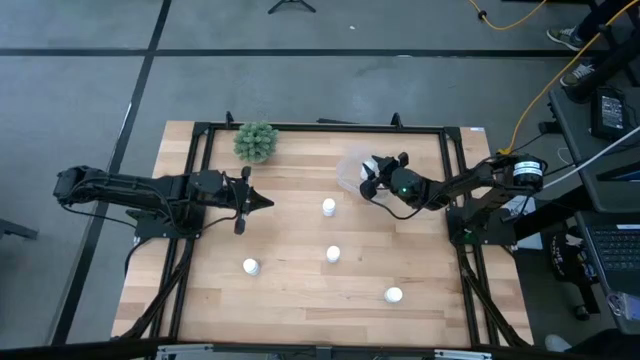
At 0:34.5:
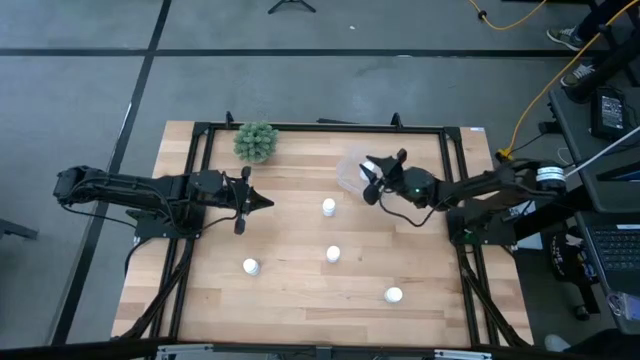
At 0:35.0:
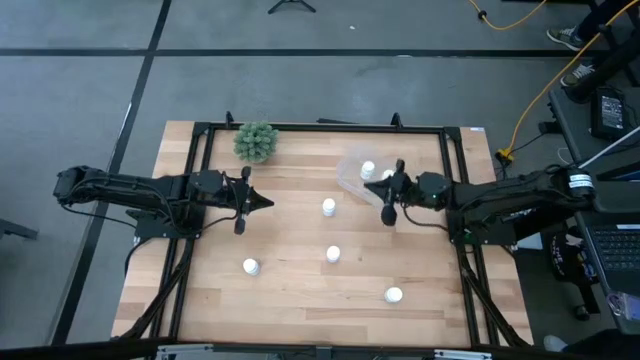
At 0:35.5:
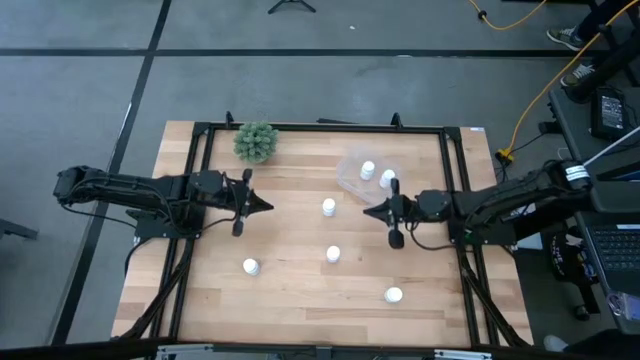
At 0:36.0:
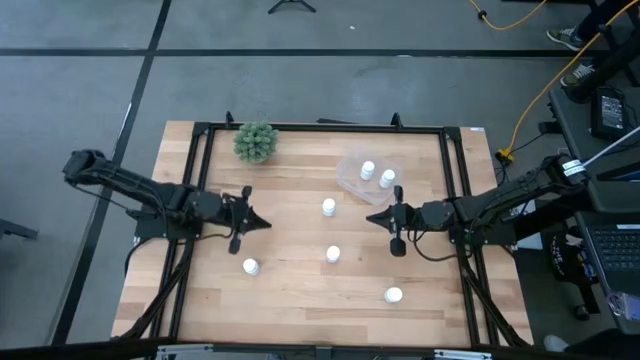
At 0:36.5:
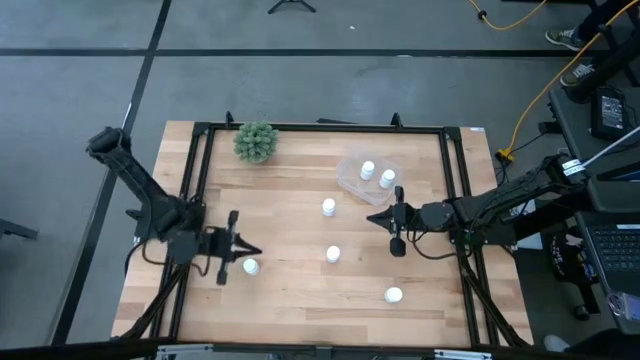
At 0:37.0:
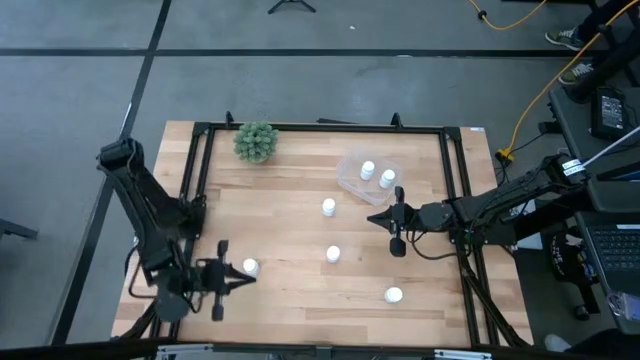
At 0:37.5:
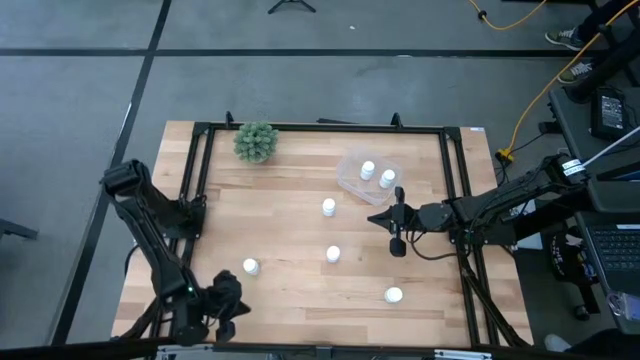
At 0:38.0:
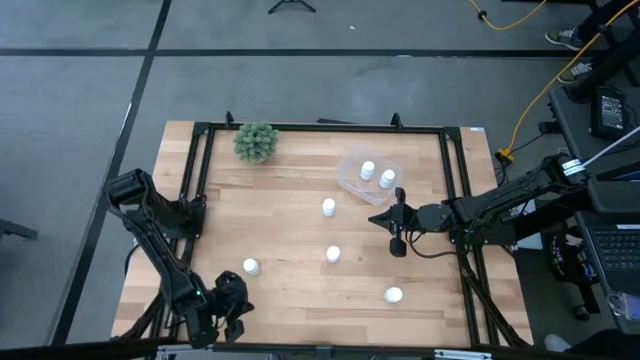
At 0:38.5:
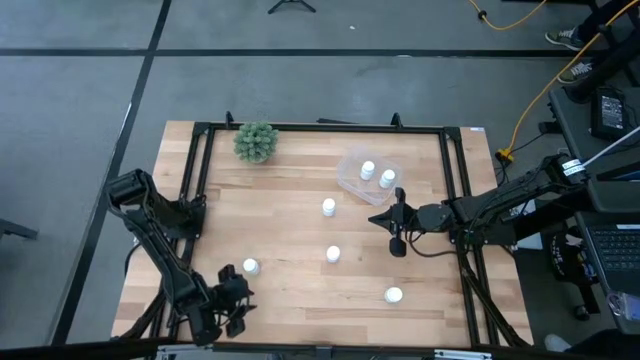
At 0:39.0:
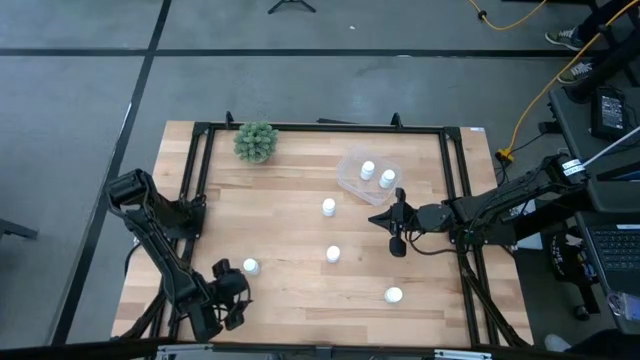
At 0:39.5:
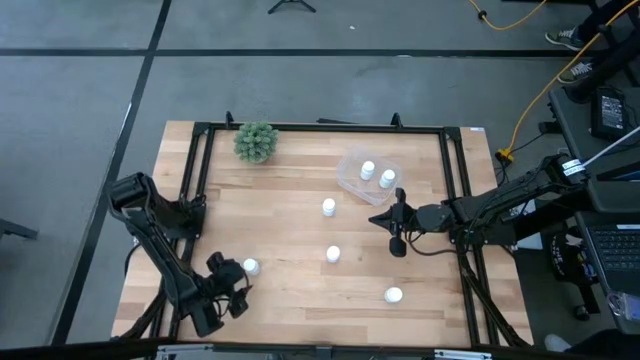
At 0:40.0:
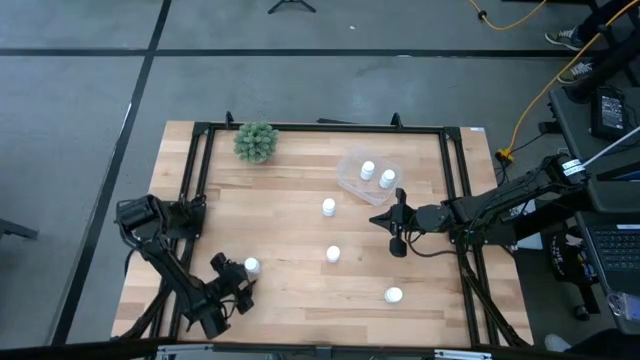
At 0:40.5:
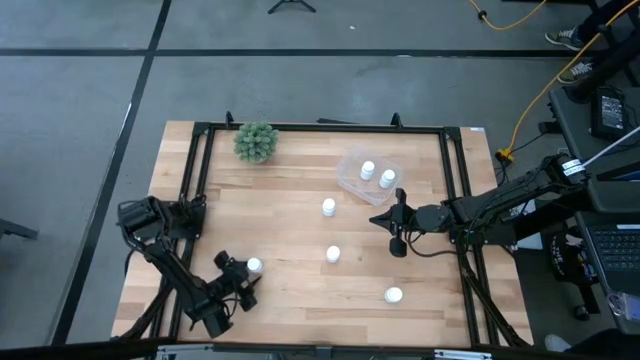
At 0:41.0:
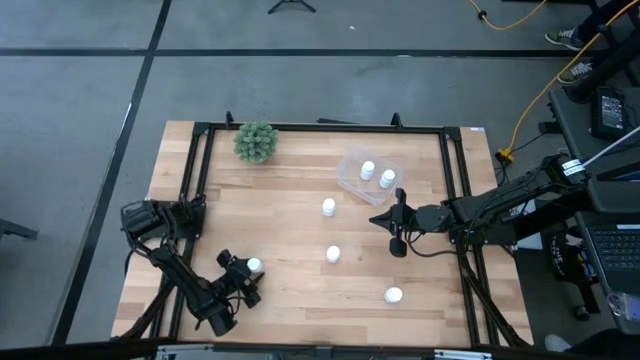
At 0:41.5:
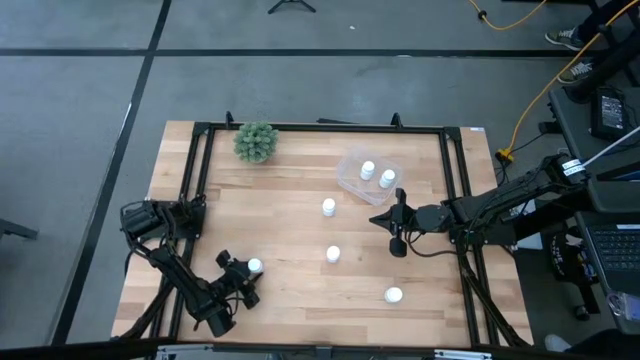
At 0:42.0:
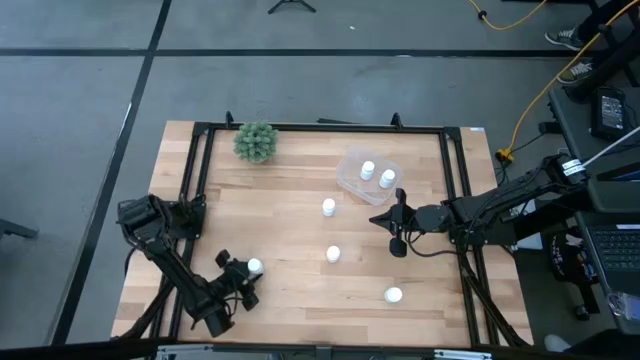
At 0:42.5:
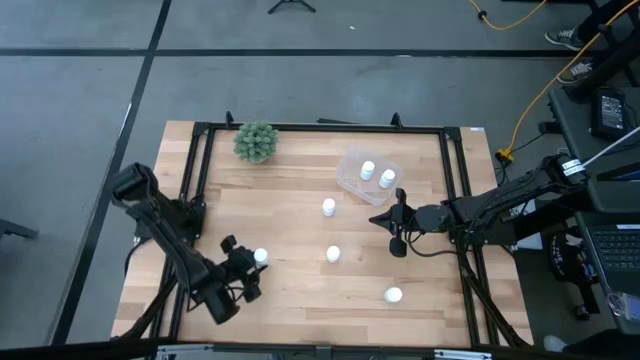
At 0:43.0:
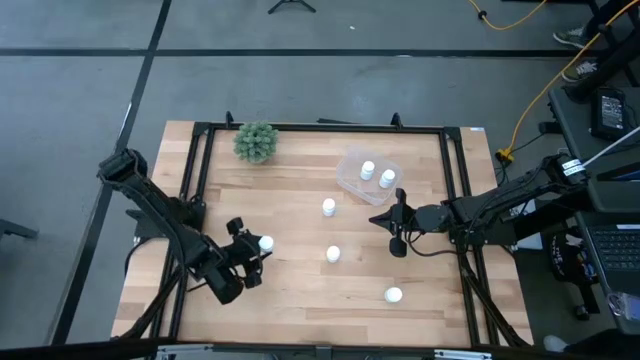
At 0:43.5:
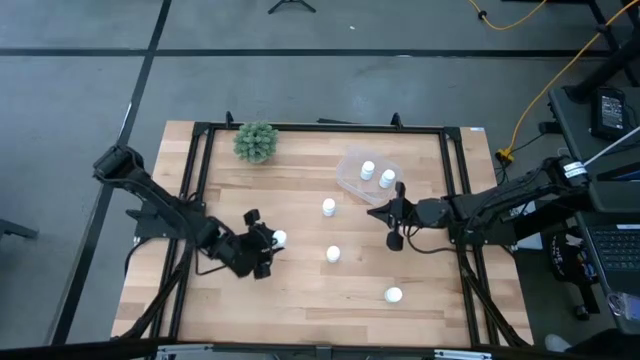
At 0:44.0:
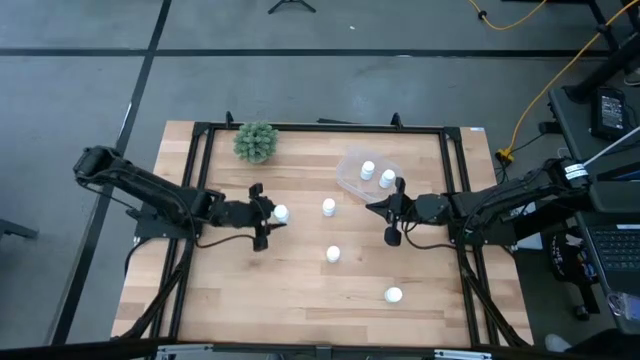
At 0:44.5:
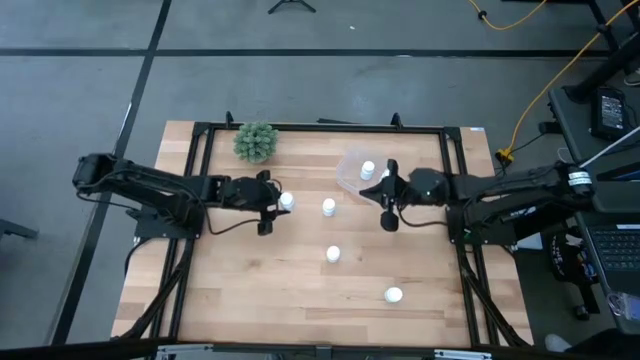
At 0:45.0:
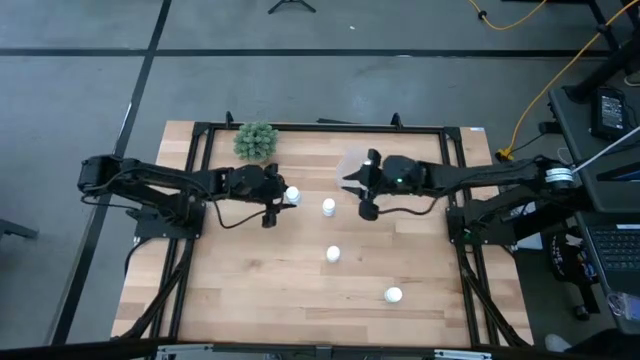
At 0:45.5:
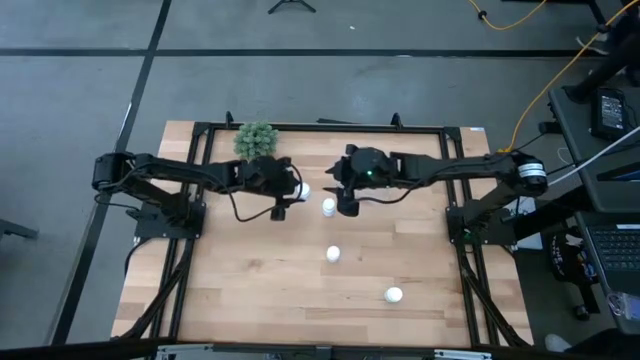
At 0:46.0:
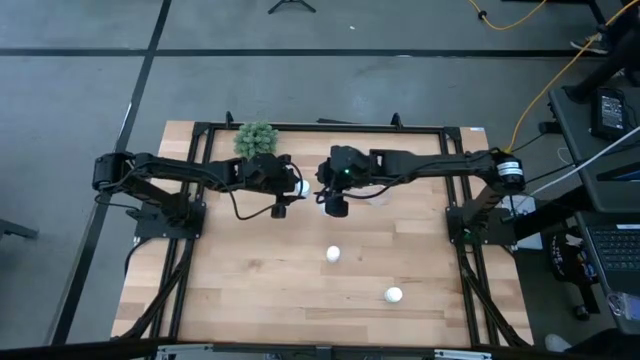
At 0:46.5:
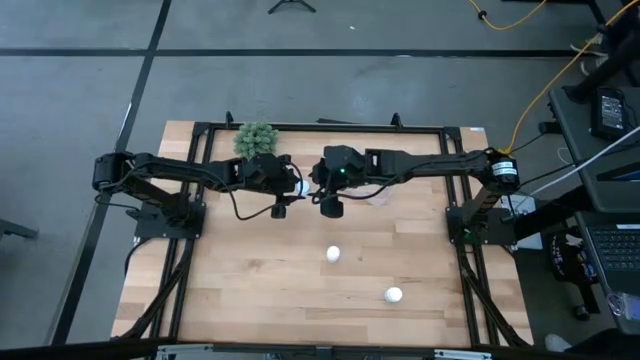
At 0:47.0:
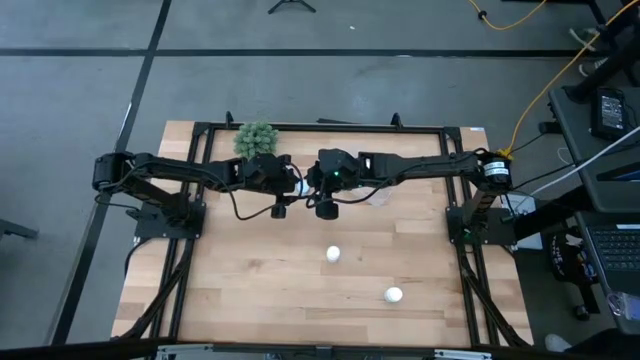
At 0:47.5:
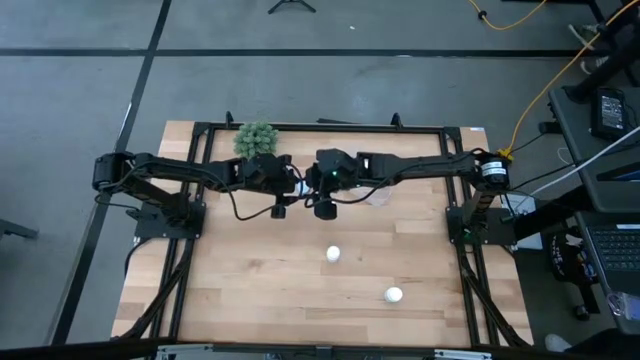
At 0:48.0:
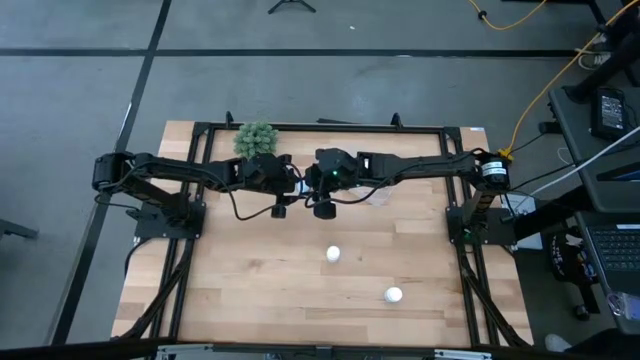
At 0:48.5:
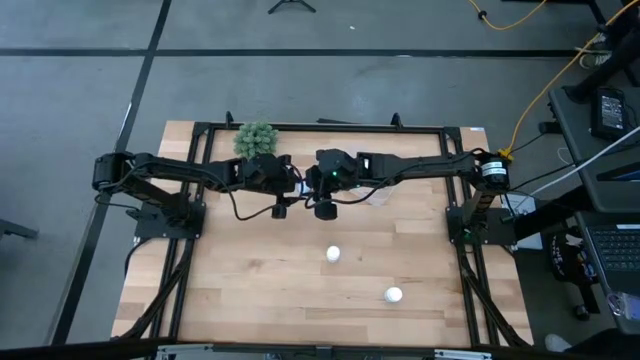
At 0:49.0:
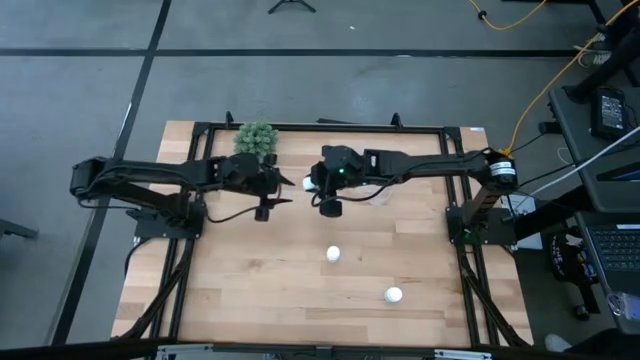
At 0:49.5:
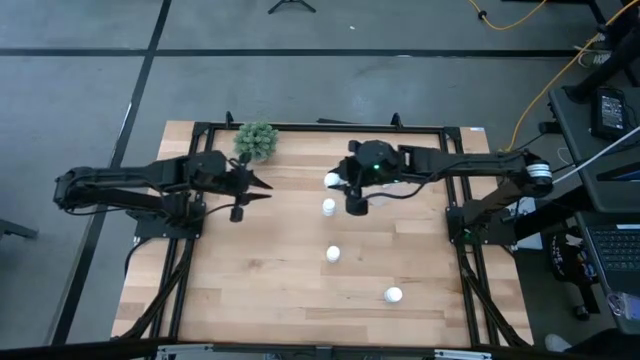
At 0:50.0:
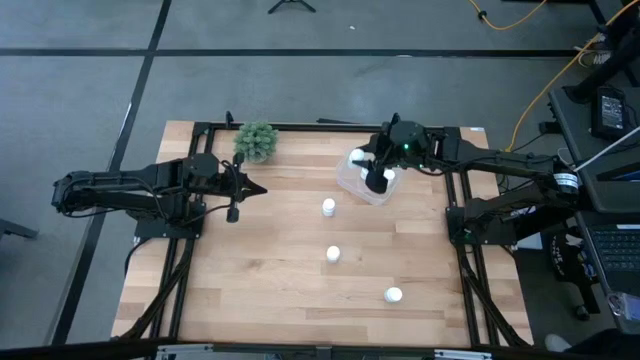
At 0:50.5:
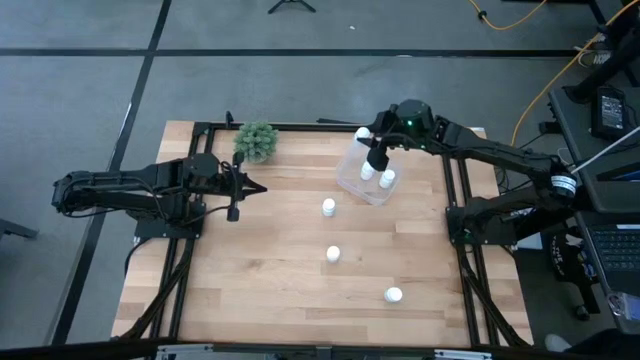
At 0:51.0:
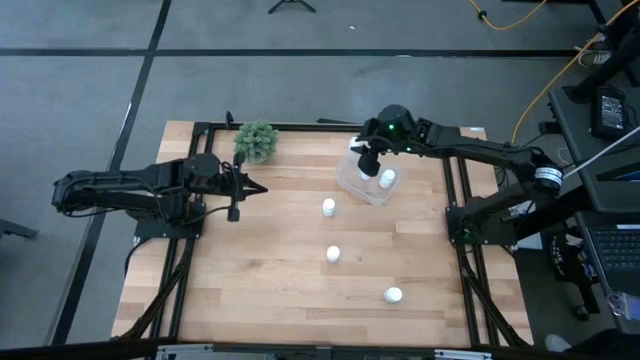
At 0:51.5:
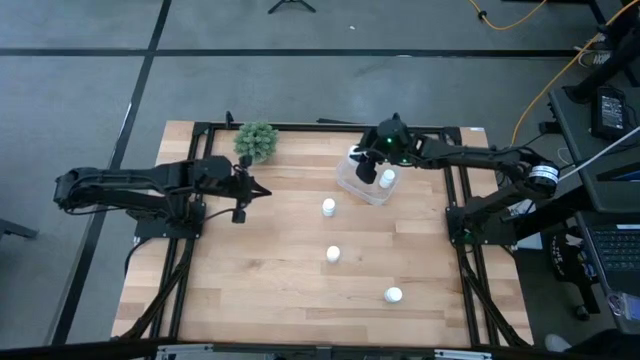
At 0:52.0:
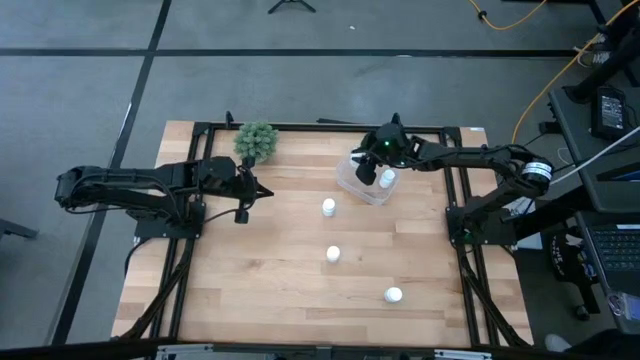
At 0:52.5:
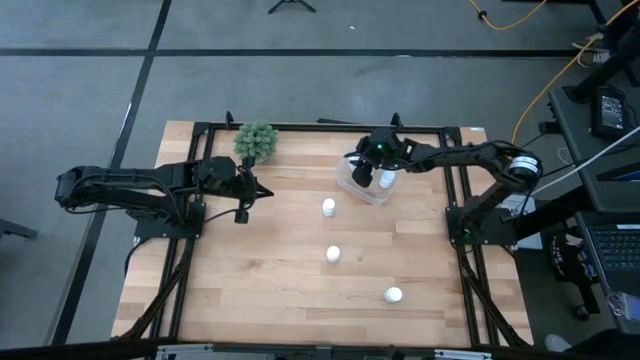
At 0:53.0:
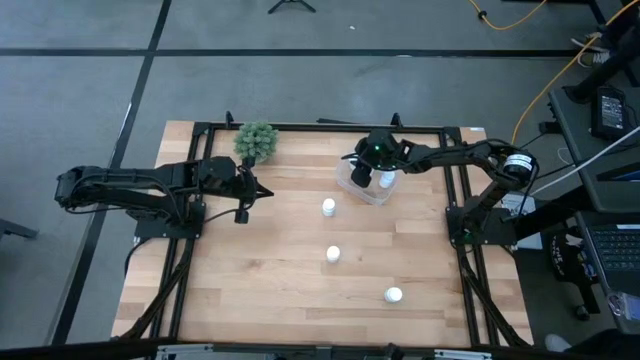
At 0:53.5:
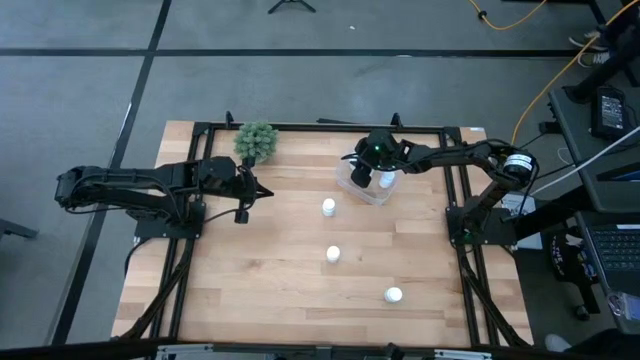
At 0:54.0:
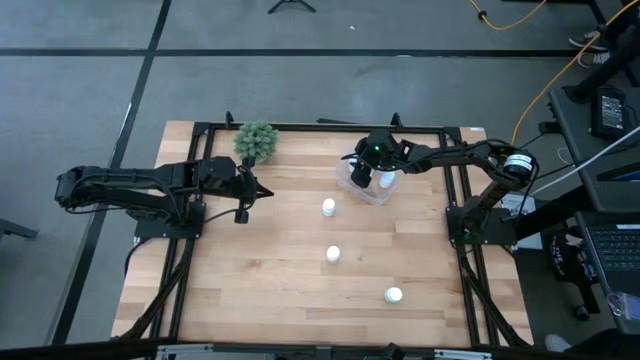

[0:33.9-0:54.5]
Task: Pick and place pill bottles into a basket
Put the white pill bottle into the transparent bin

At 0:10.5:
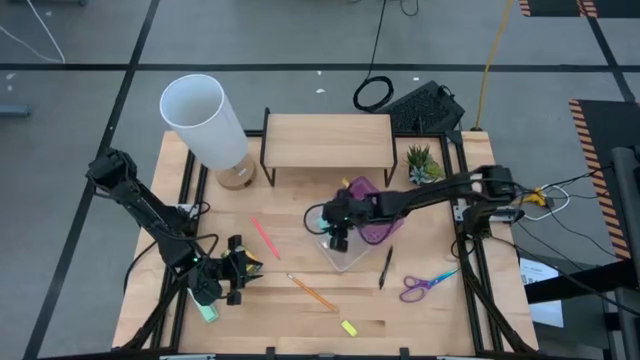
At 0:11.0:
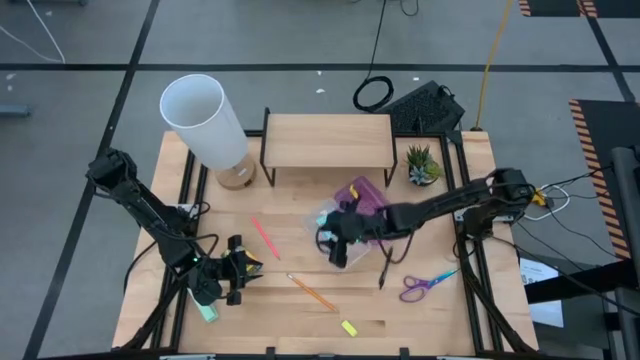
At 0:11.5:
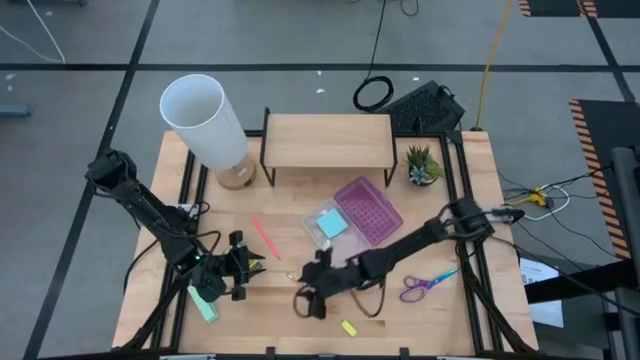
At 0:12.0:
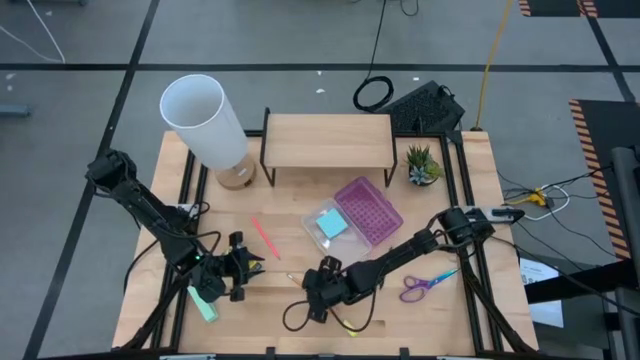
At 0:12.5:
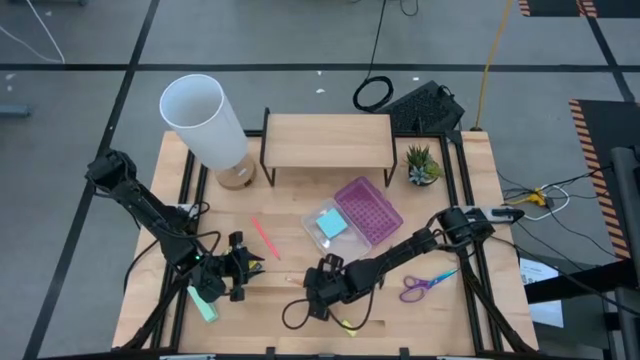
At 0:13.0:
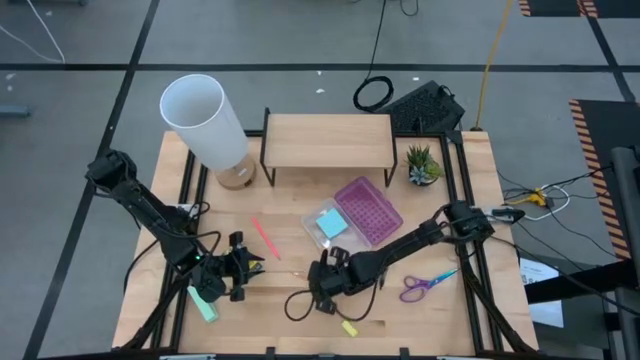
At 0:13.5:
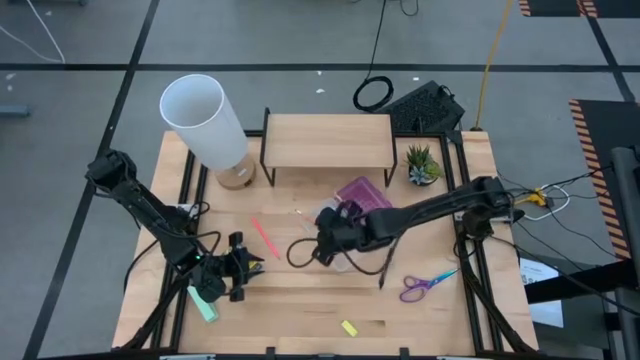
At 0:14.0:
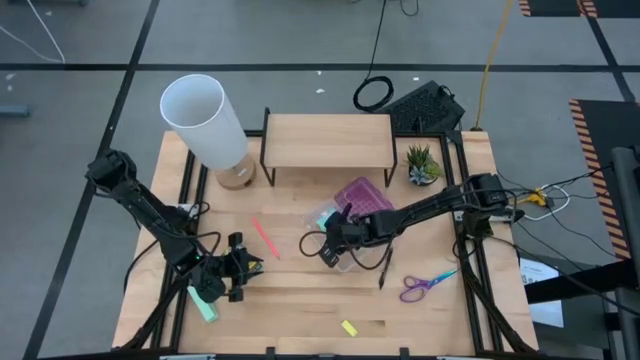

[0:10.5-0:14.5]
Task: Pack school essentials
Put the yellow pencil into the transparent violet supply box
